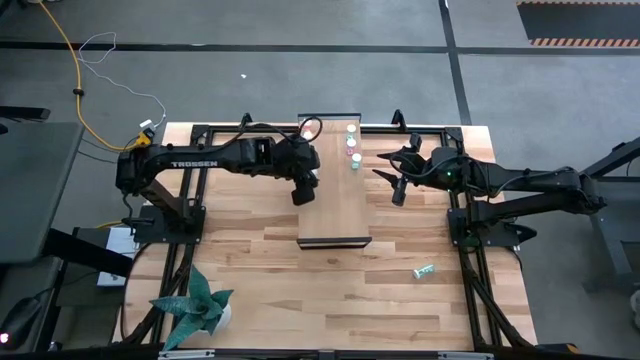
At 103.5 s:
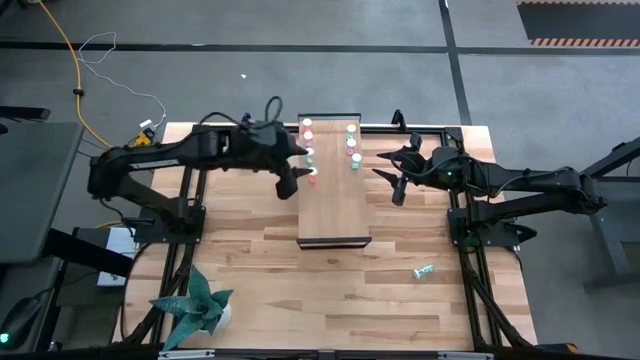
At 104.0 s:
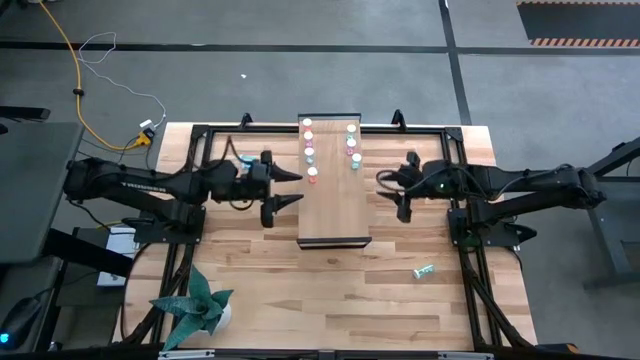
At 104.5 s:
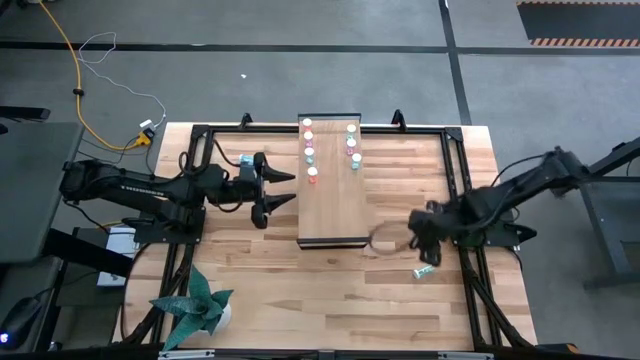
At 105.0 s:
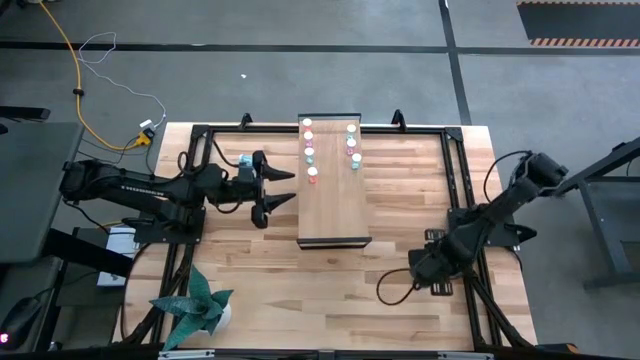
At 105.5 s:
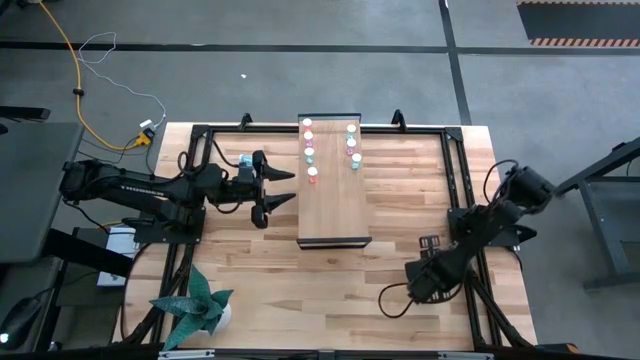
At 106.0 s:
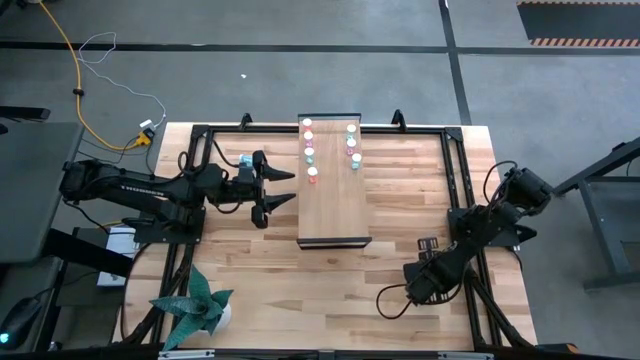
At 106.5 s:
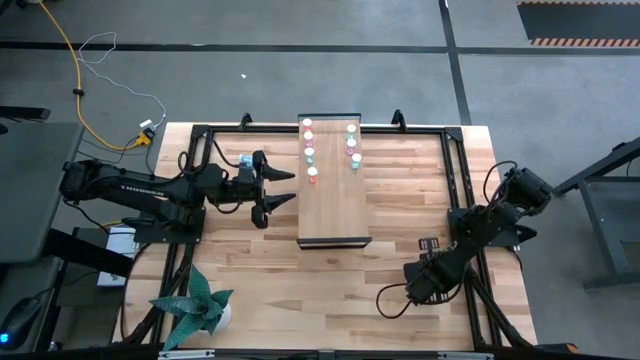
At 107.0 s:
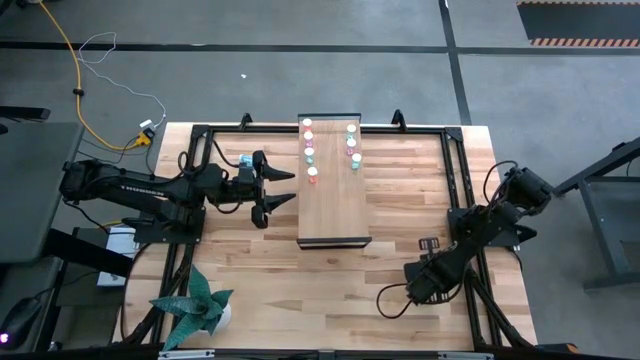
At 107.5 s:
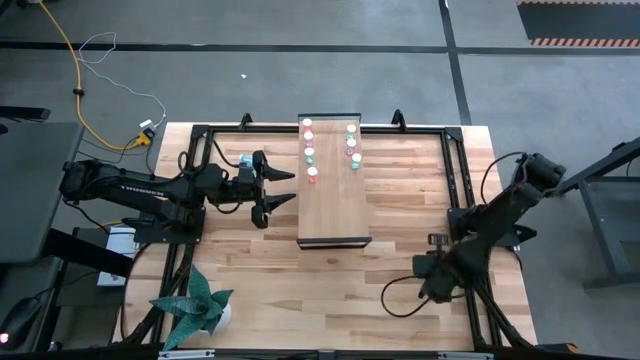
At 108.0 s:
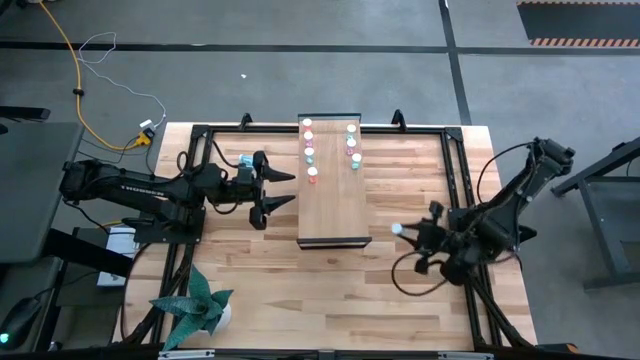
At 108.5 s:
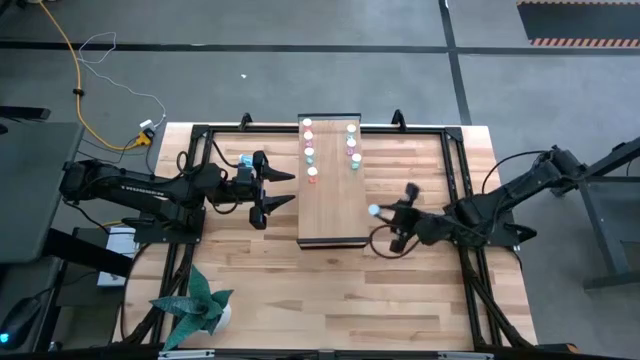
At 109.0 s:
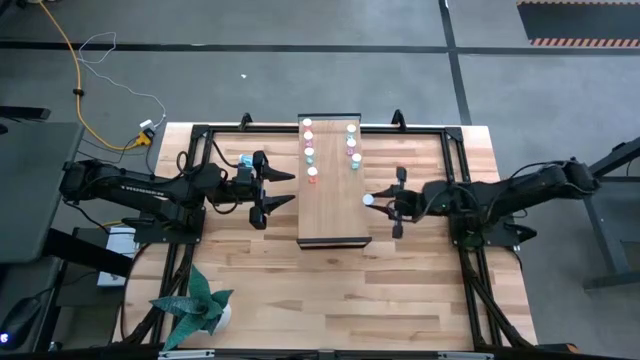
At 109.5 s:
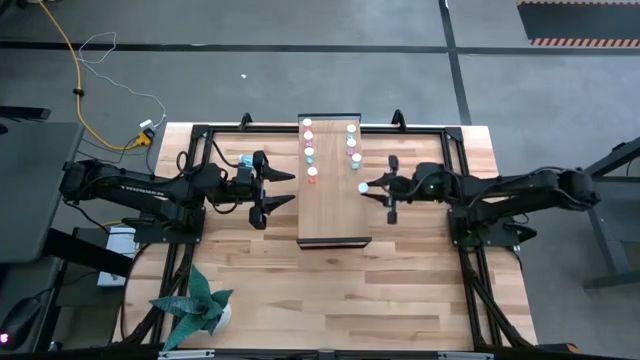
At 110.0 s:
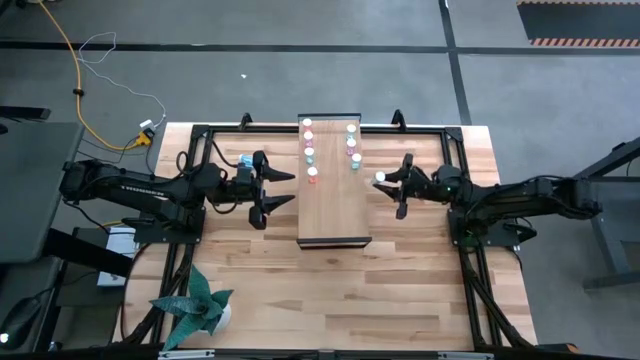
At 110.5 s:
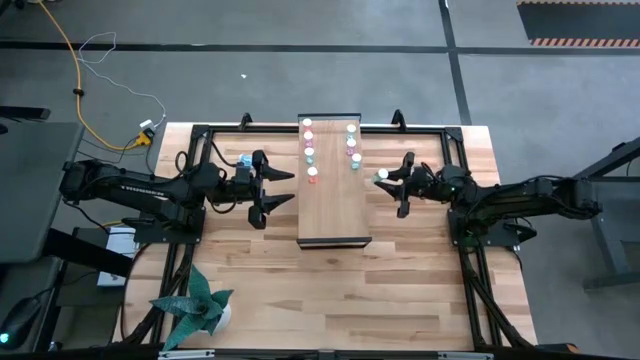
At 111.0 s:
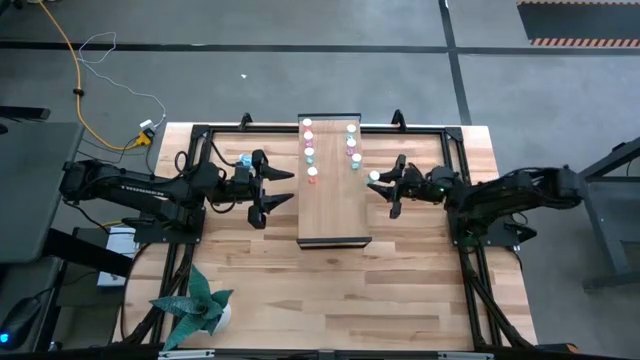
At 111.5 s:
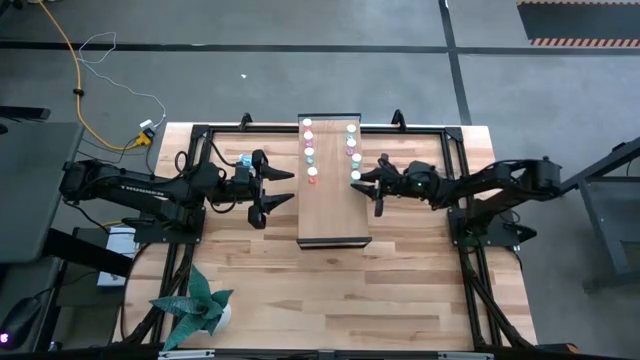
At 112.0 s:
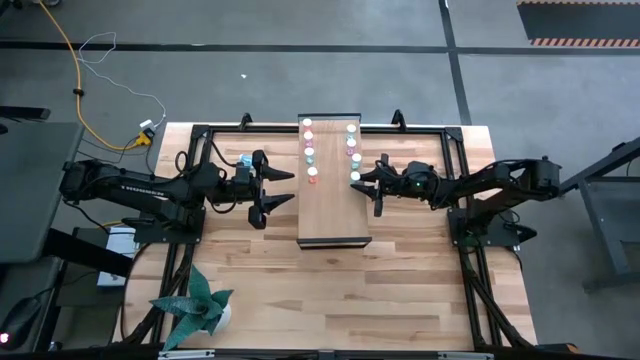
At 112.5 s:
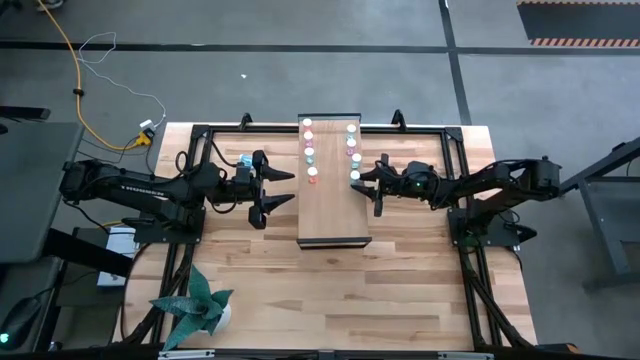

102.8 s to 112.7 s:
Task: Pick and place medicine bottles onto shelf by color
Put the transparent green pill bottle on the shelf

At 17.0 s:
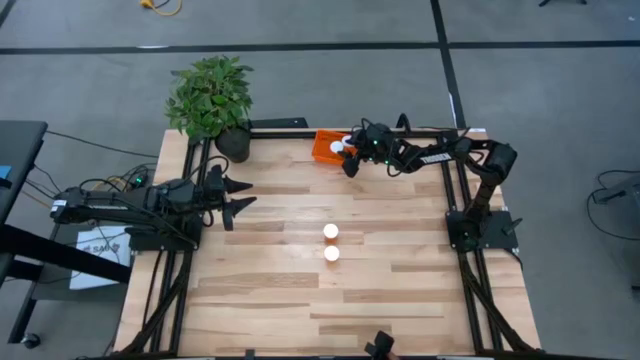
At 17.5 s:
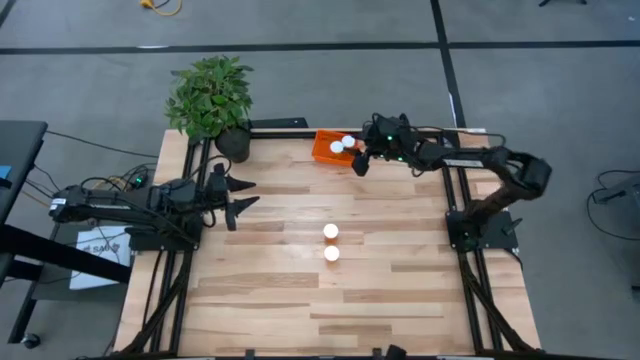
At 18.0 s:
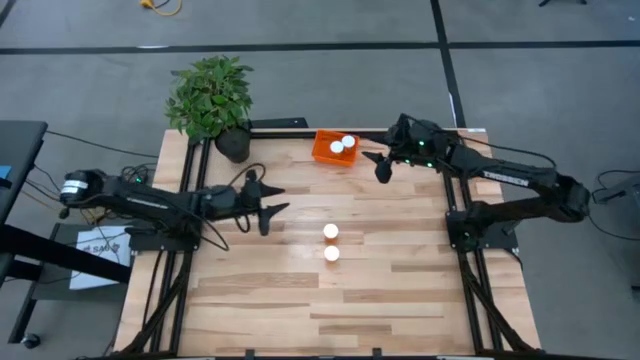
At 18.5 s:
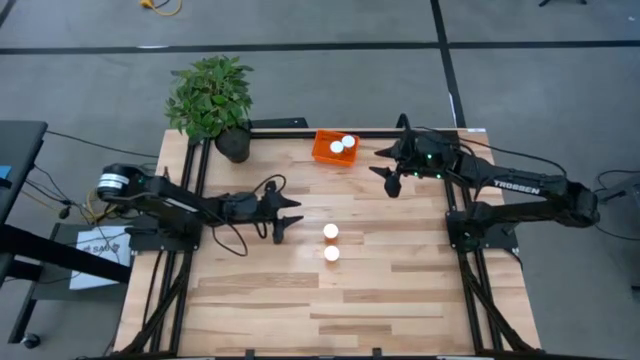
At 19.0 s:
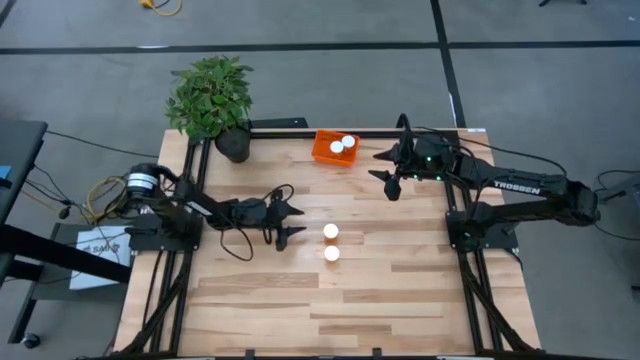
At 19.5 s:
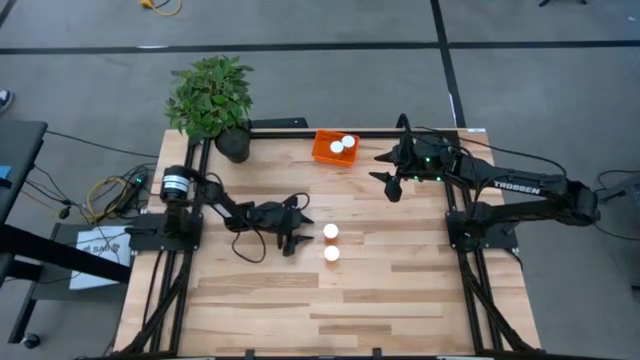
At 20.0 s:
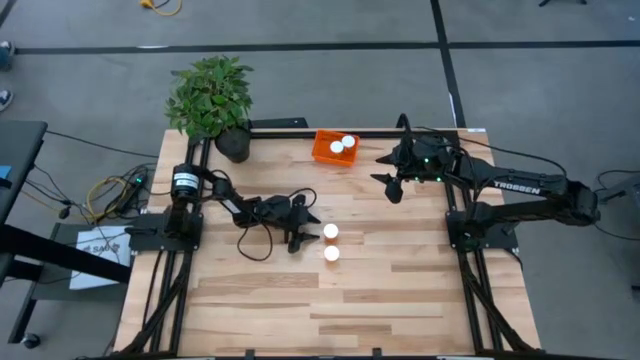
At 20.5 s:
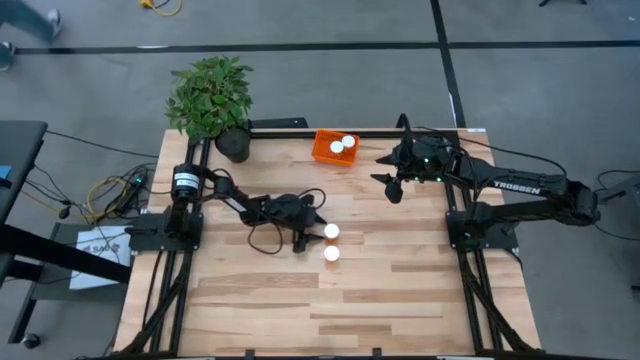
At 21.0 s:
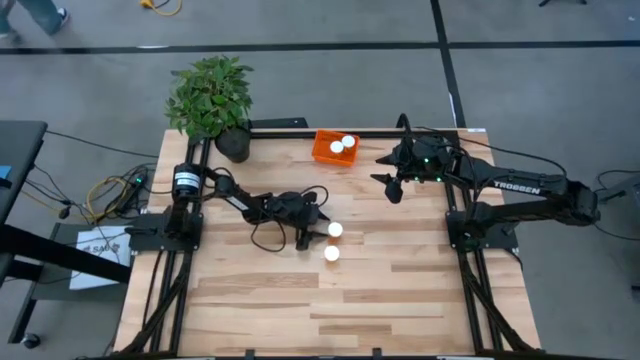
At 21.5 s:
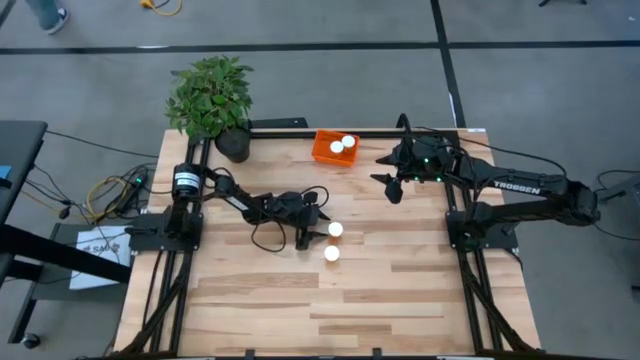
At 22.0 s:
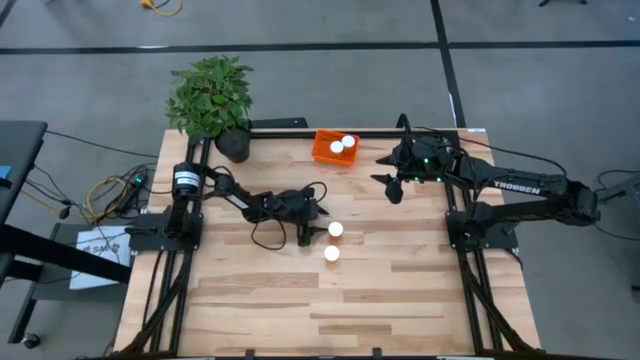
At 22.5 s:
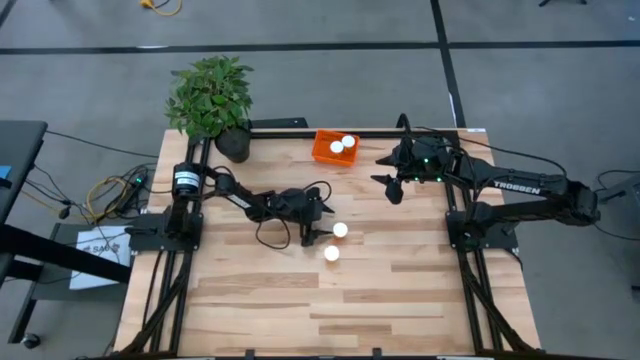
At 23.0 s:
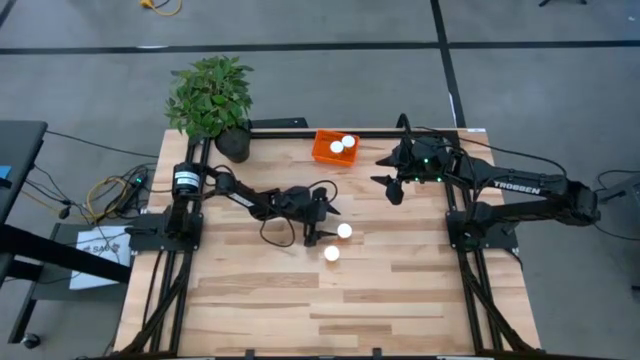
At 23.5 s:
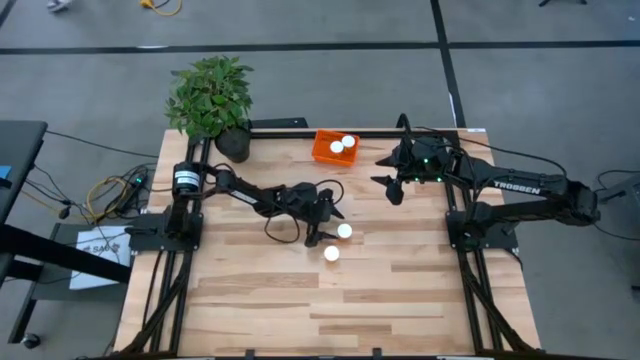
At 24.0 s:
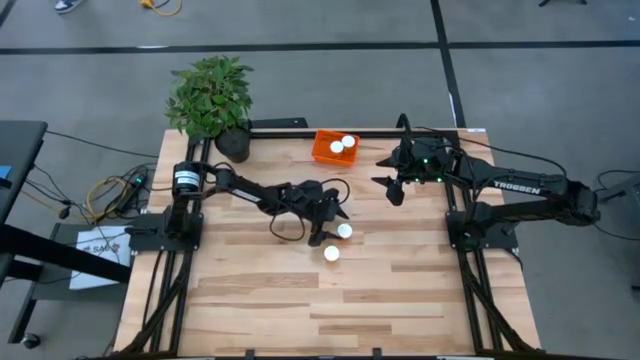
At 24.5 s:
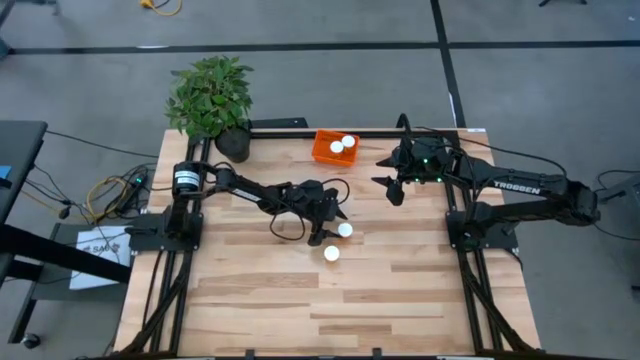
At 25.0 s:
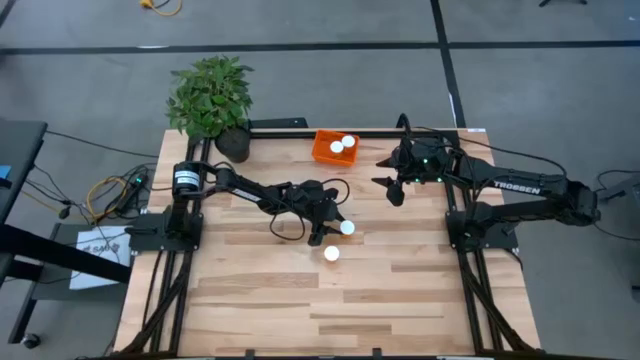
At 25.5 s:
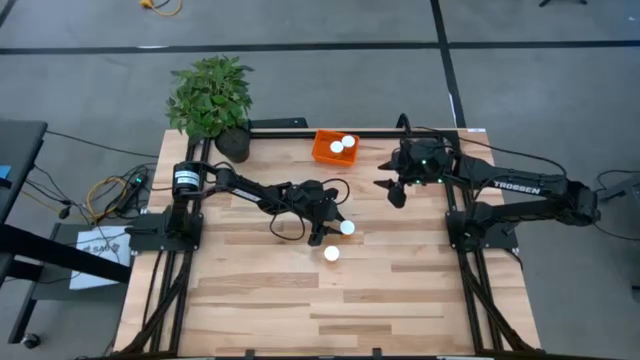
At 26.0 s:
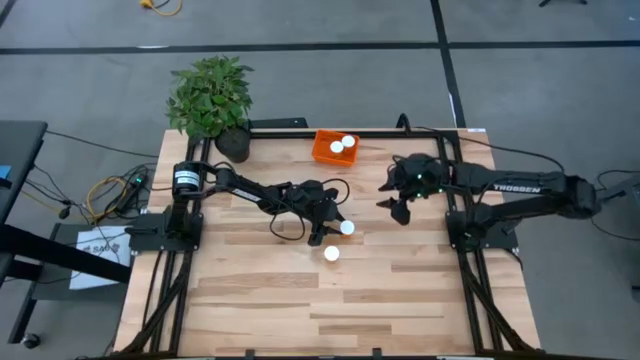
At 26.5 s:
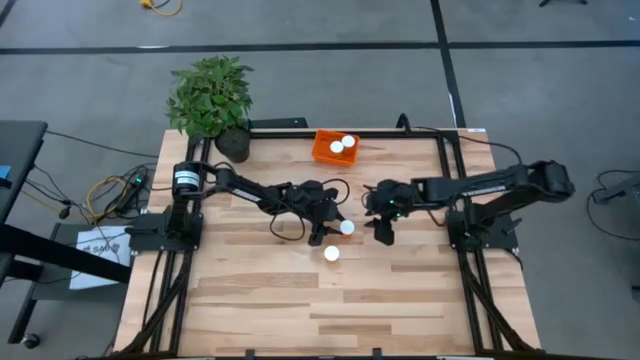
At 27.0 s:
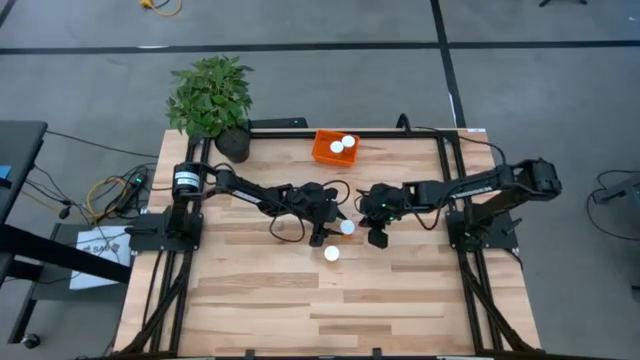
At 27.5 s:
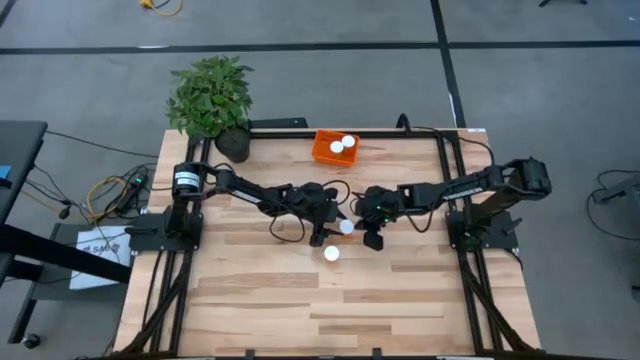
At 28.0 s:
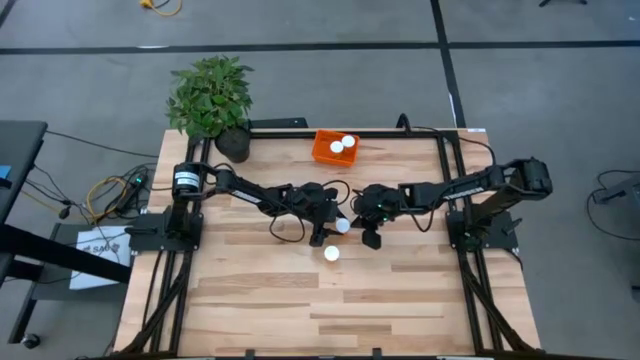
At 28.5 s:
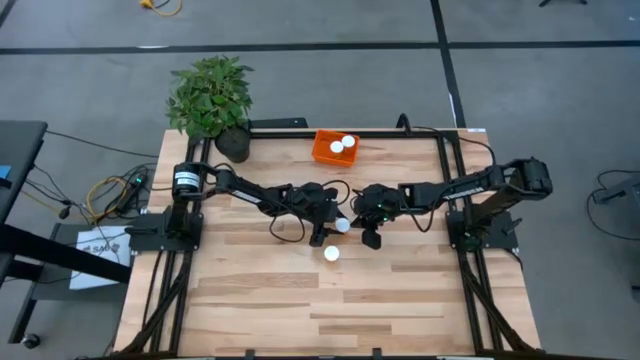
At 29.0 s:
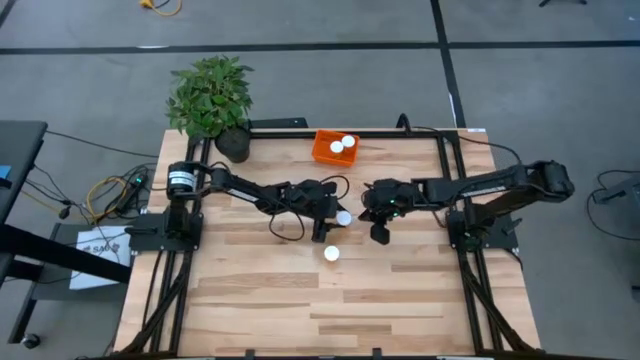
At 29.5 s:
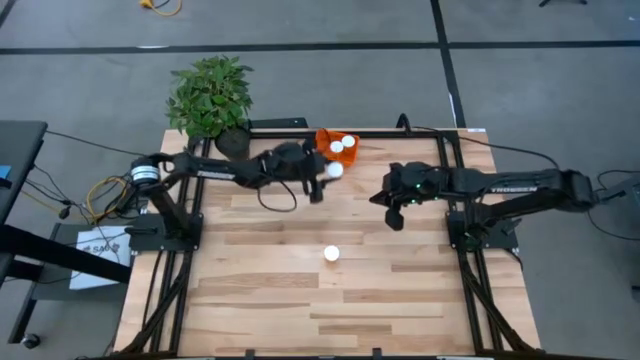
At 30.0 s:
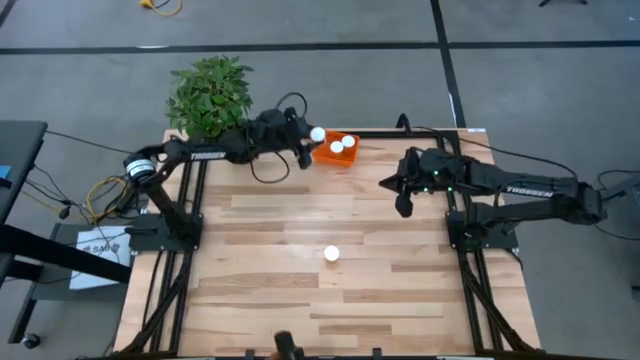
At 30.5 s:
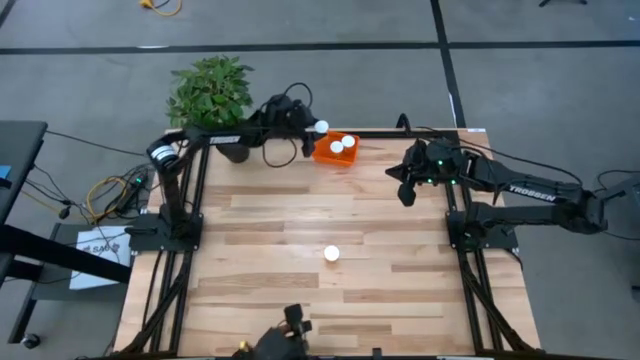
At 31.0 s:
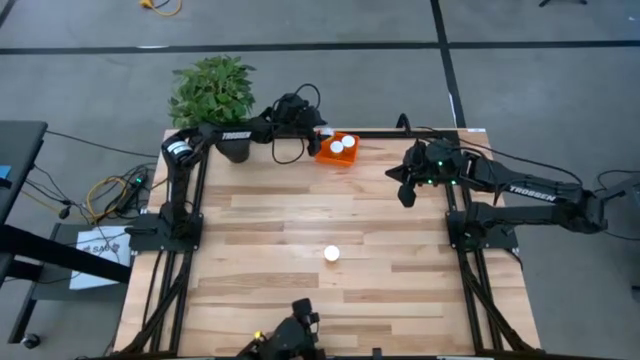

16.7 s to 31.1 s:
Task: Pick and place pill bottles into a basket
Put the orange medicine bottle into the orange bin
